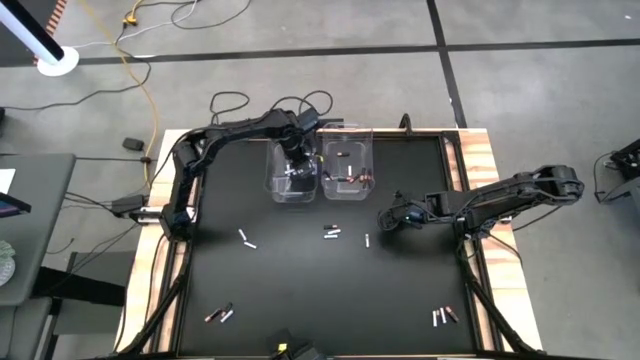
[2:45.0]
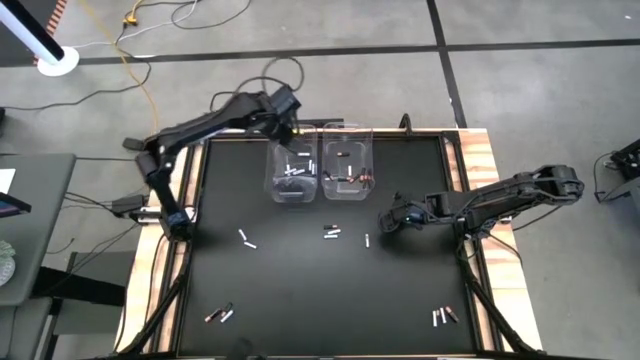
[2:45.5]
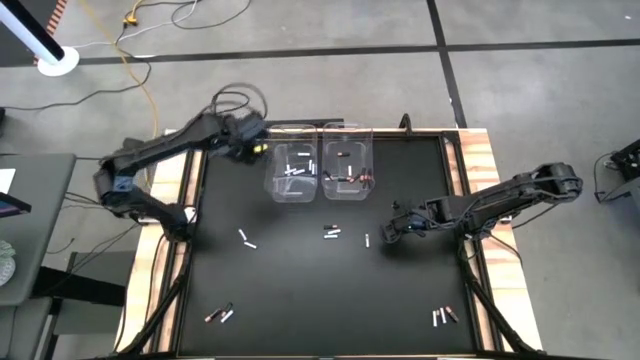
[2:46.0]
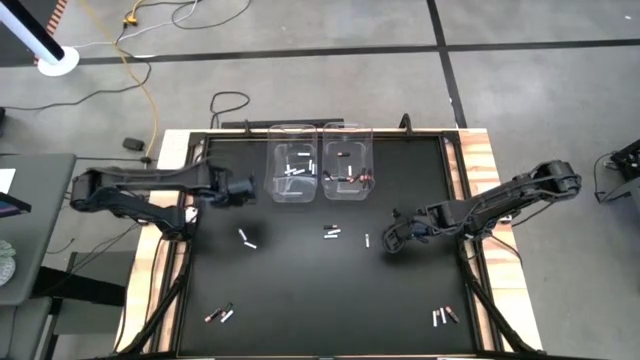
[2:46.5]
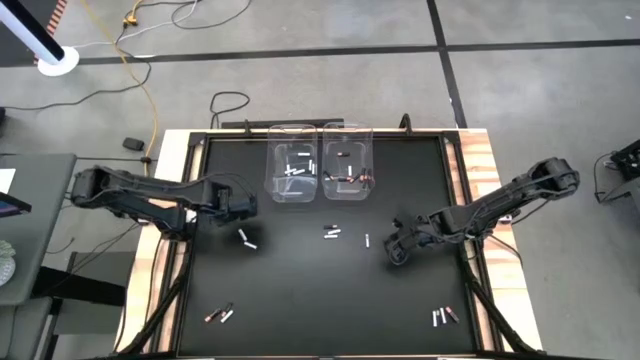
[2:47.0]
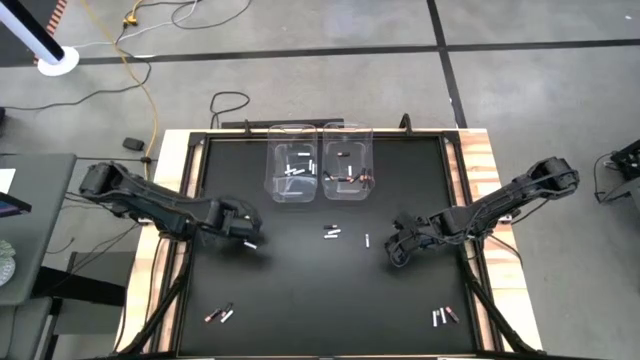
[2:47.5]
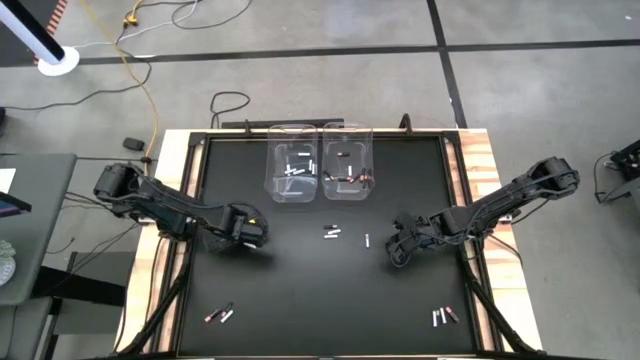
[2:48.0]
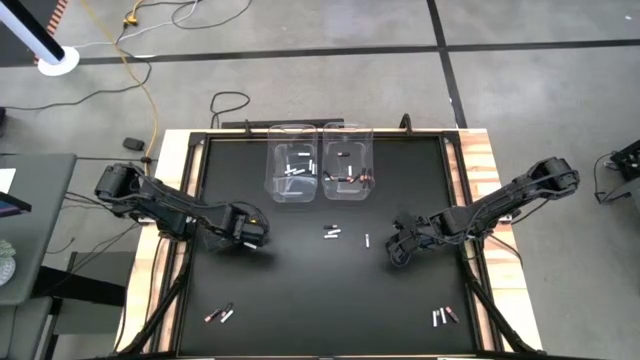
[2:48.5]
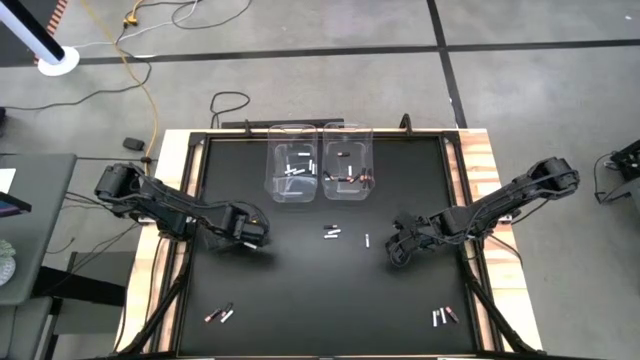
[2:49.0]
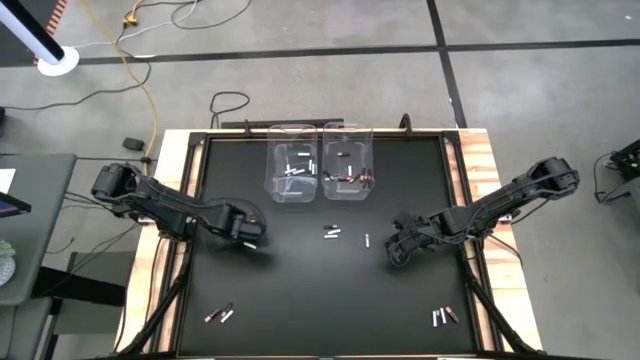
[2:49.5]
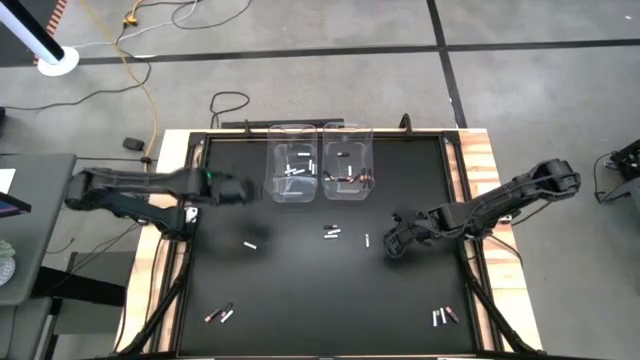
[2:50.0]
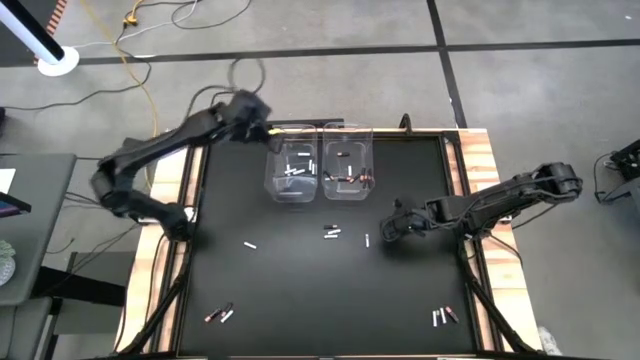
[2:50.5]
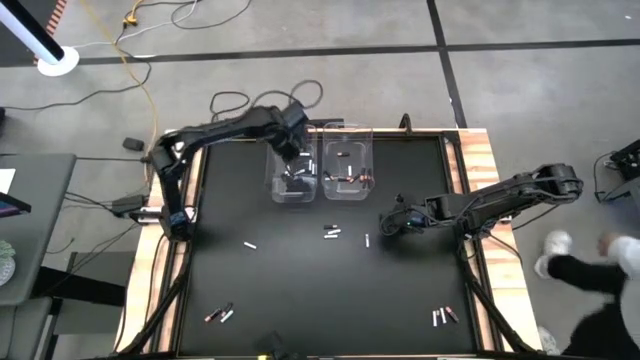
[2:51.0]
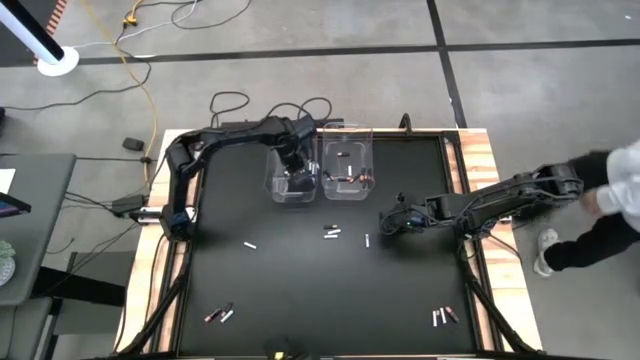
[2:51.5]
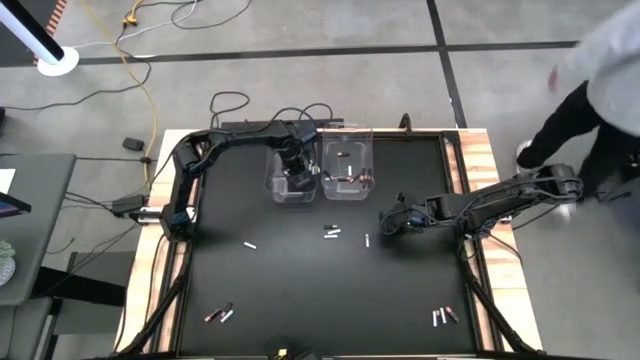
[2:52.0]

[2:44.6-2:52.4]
Task: Sort batteries
Put the white battery into the left transparent bin

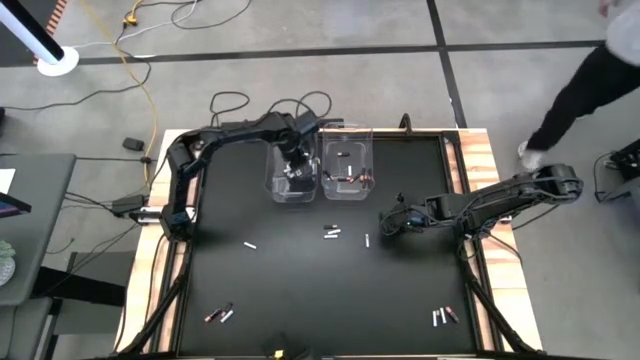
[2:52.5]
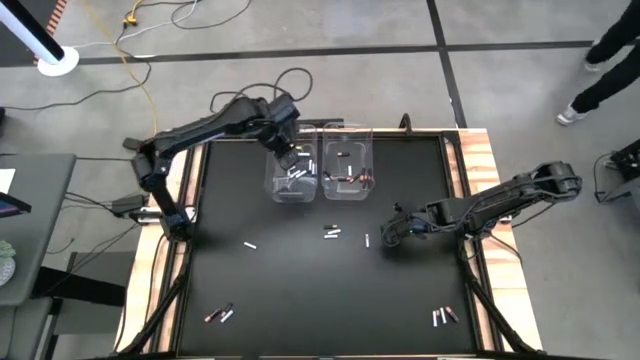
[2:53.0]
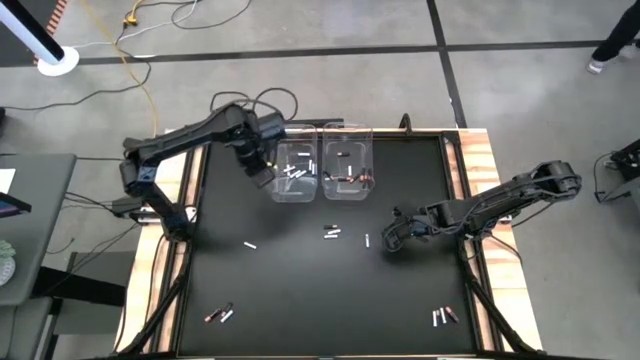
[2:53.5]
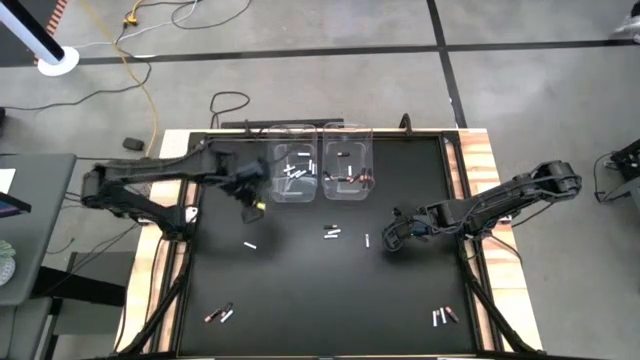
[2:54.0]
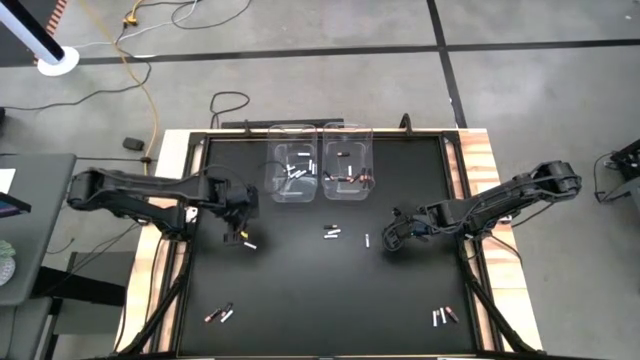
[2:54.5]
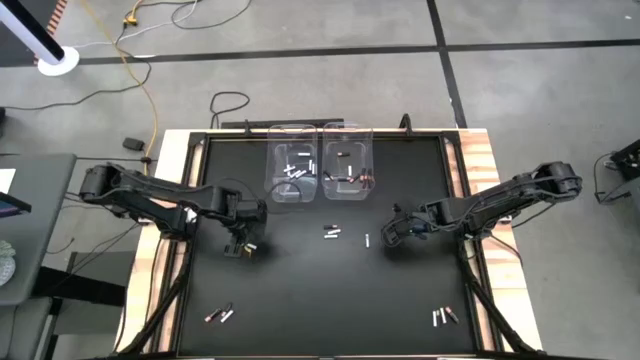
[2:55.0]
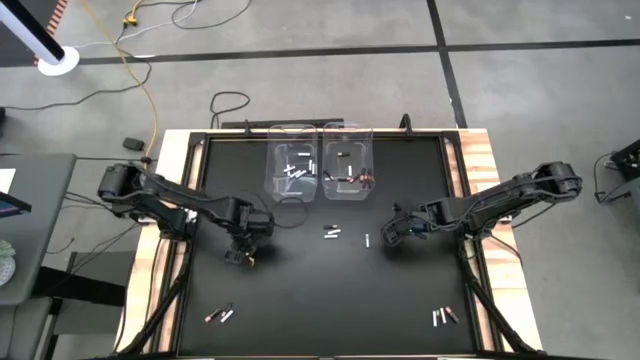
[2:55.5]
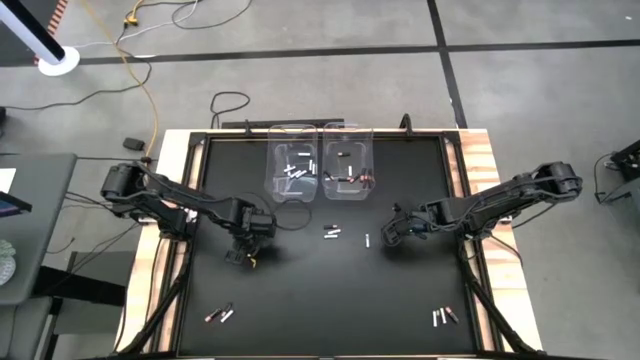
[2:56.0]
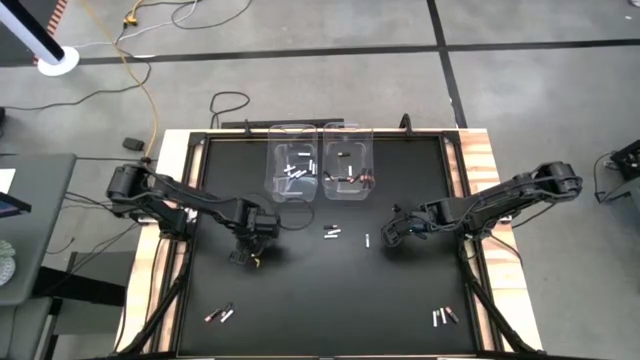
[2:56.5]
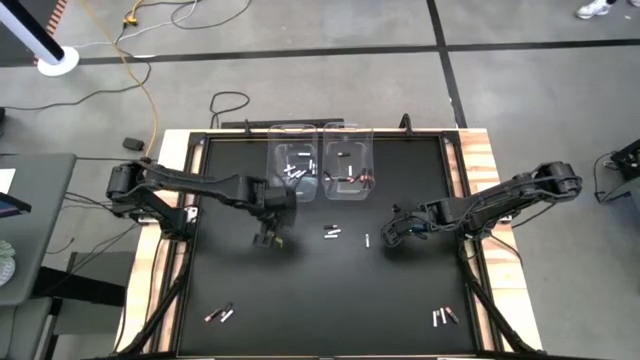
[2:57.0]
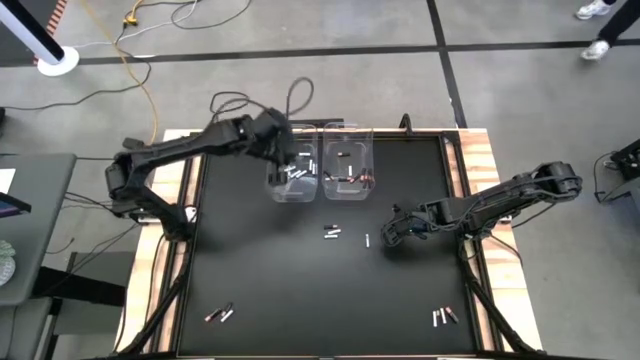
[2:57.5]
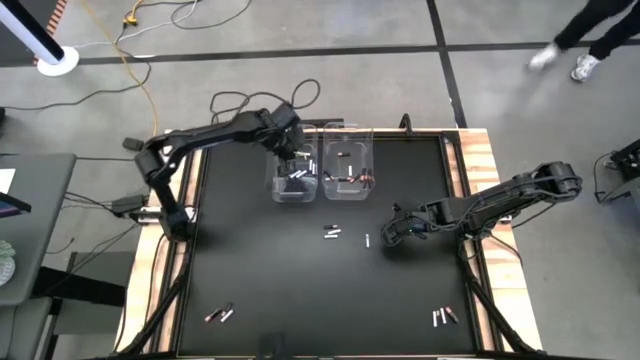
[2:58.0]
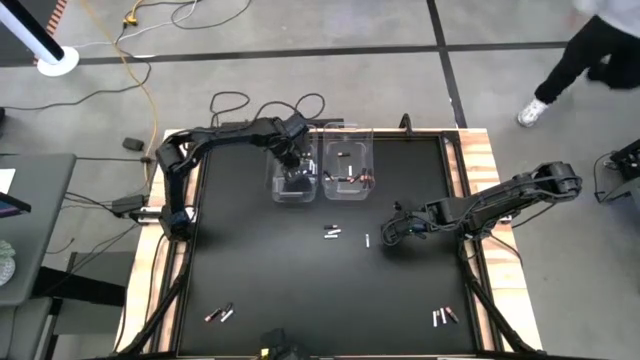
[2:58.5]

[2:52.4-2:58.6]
Put the white battery into the left transparent bin

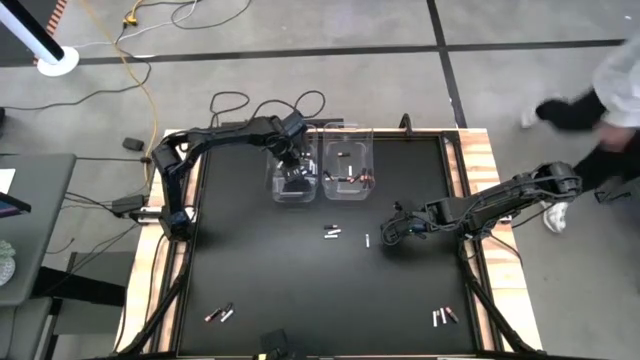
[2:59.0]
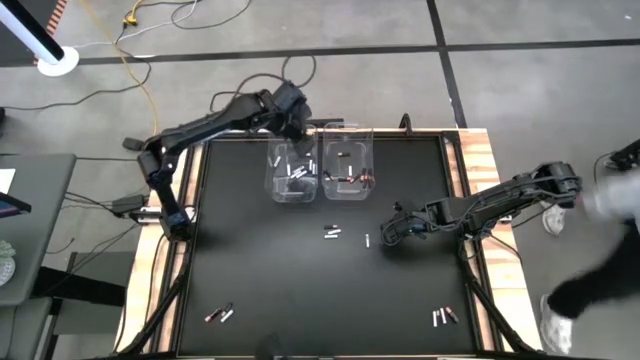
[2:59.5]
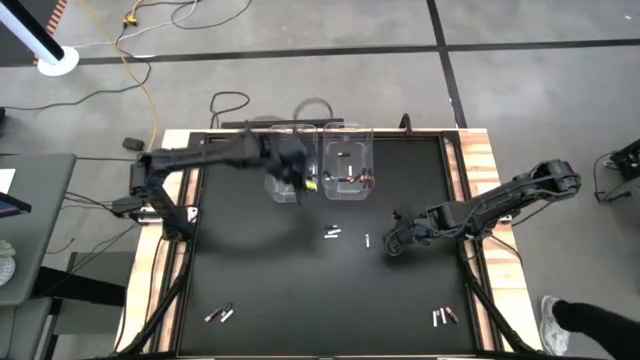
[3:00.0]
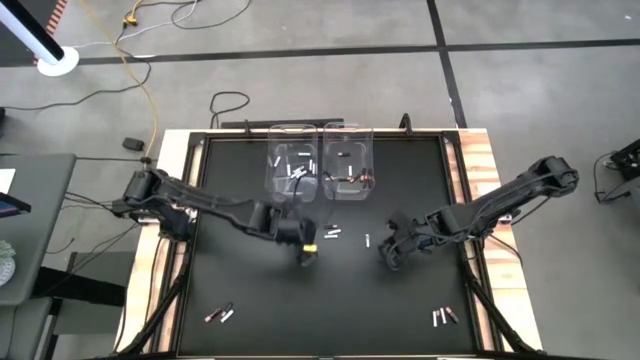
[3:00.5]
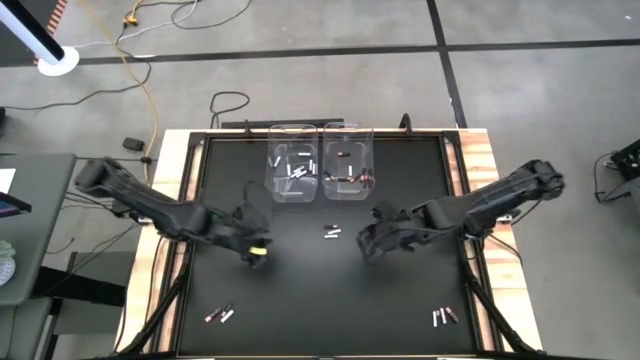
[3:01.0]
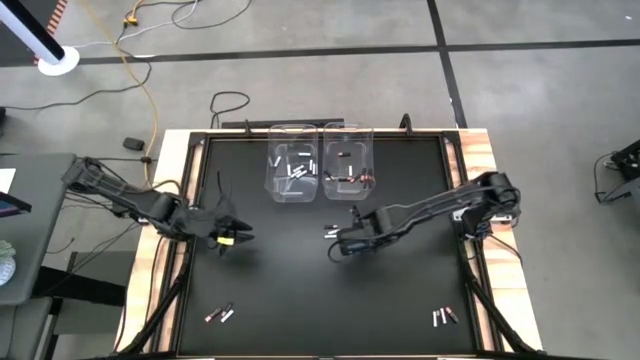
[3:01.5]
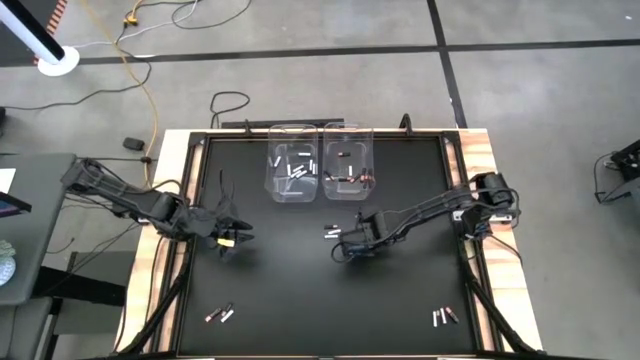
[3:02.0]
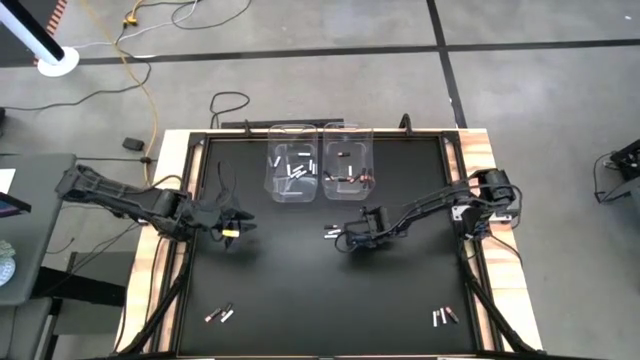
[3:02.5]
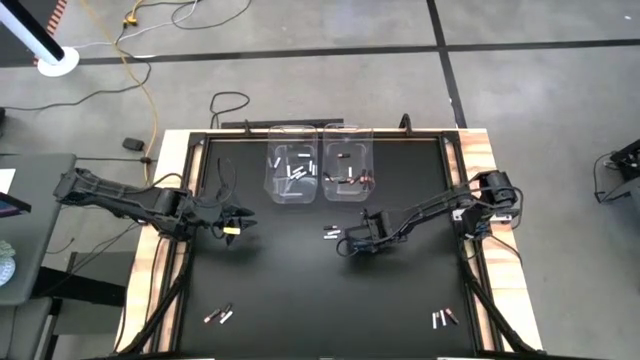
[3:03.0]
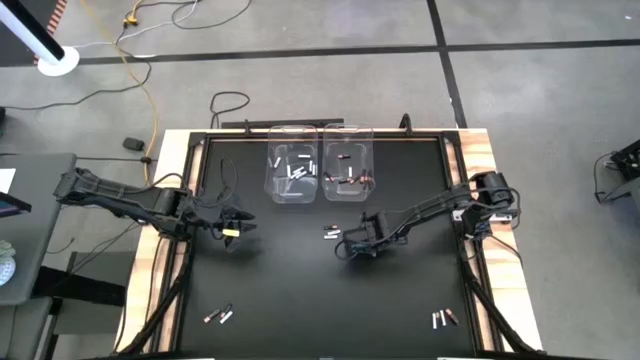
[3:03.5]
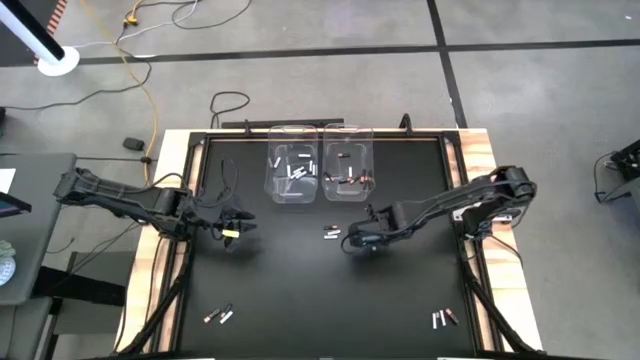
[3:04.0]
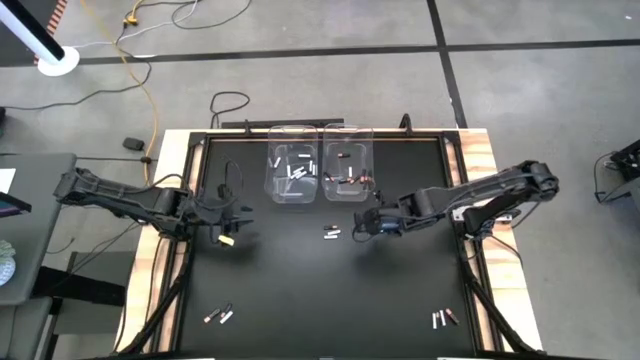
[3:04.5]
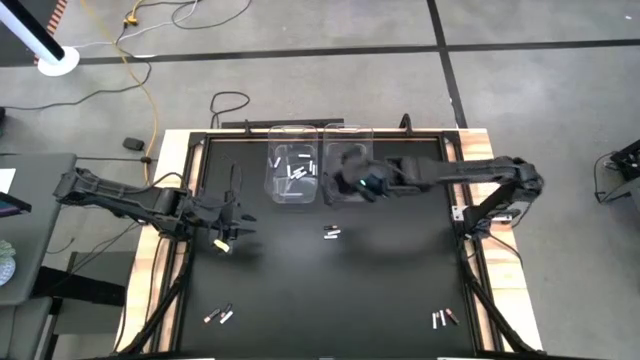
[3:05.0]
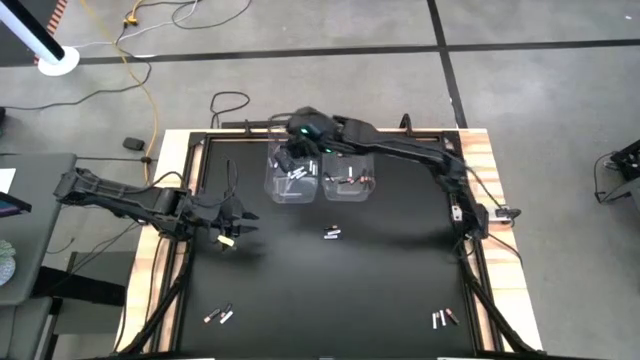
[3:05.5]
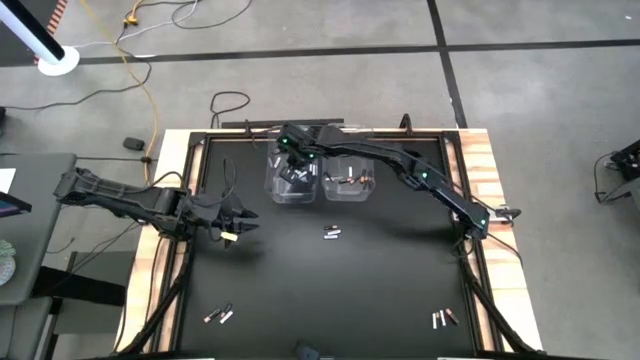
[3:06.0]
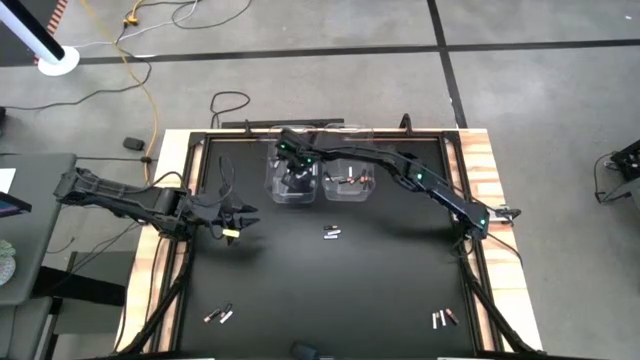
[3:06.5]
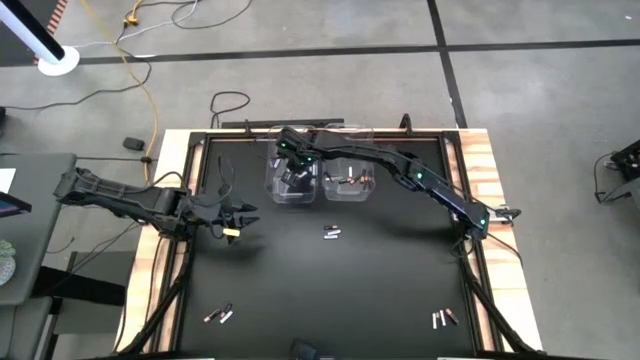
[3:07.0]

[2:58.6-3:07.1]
Put the white battery into the left transparent bin
